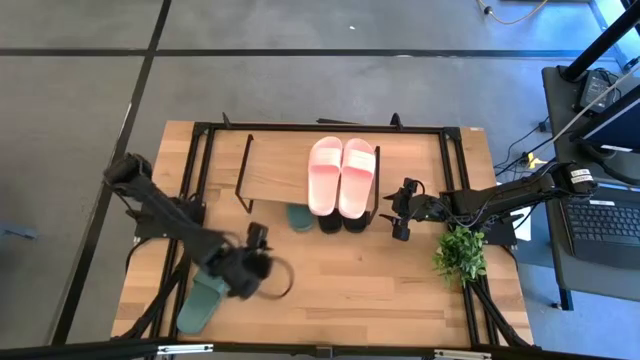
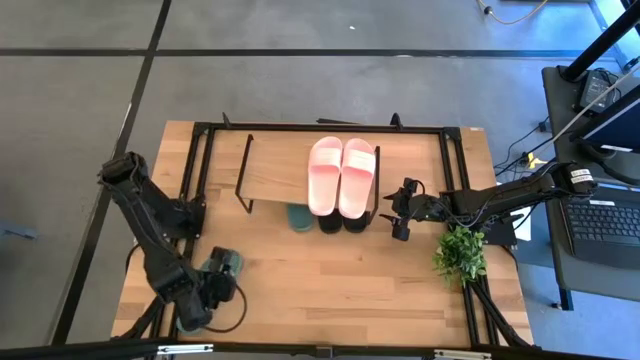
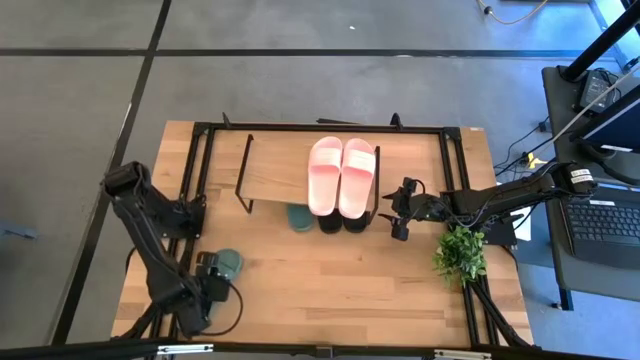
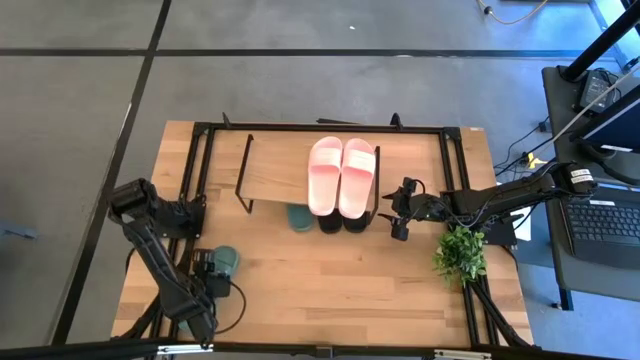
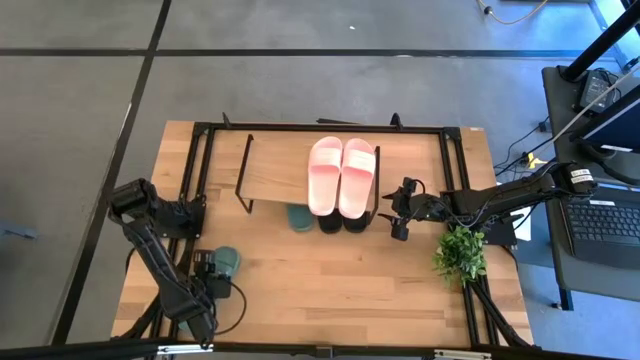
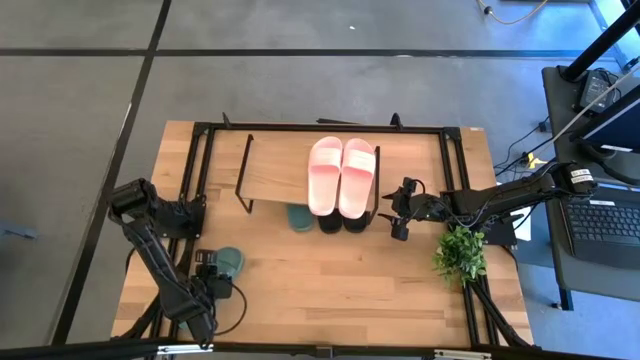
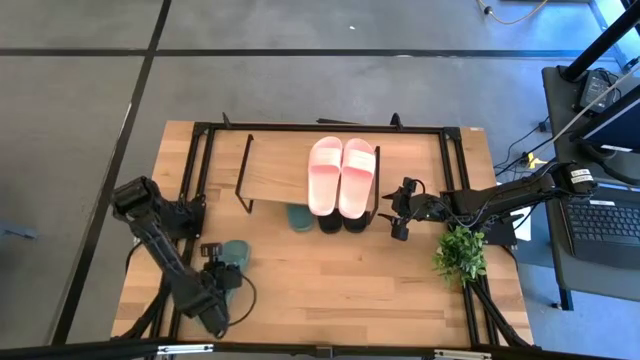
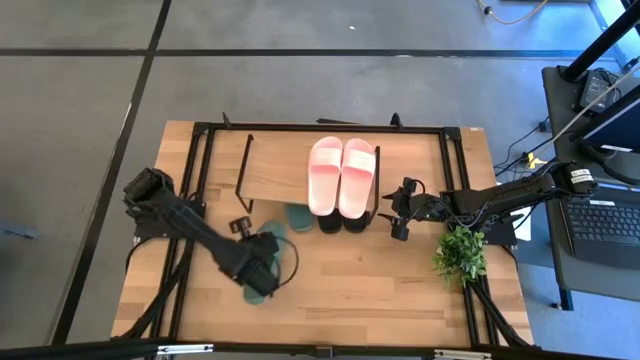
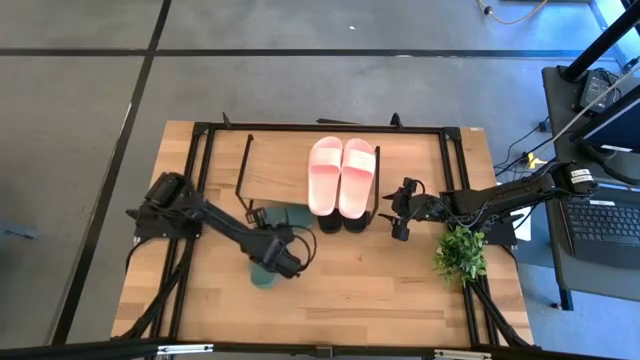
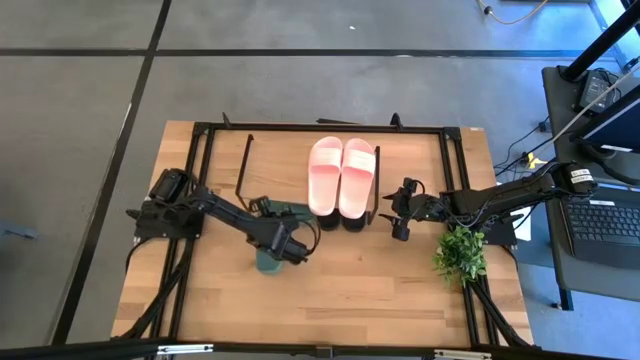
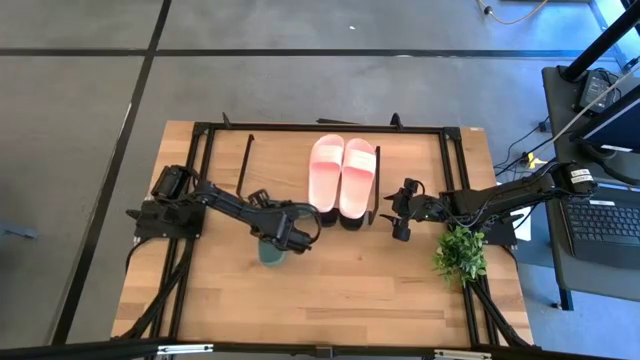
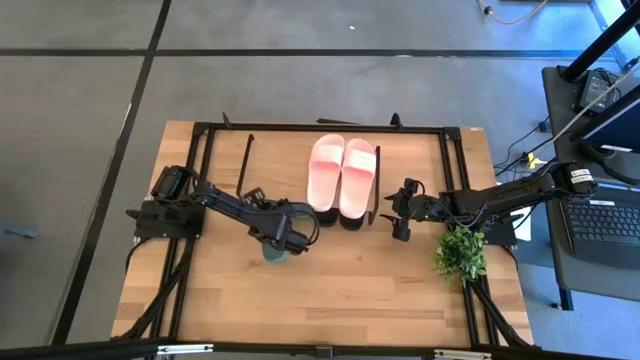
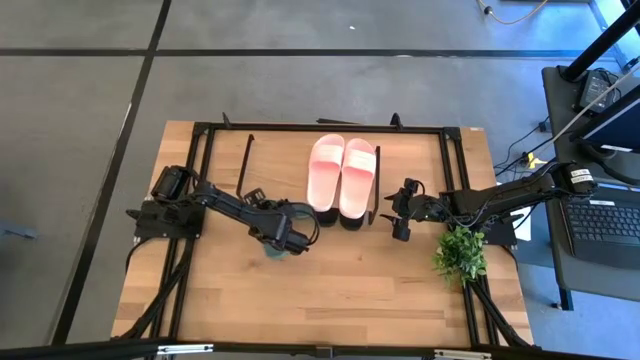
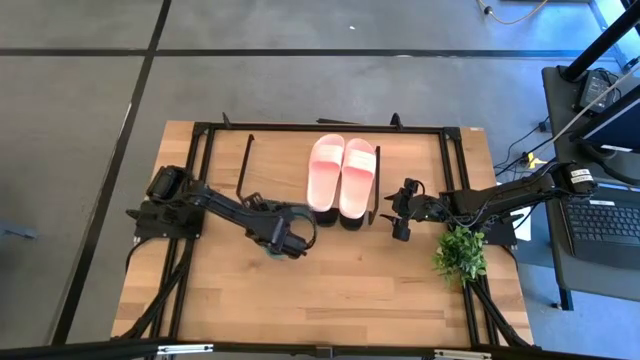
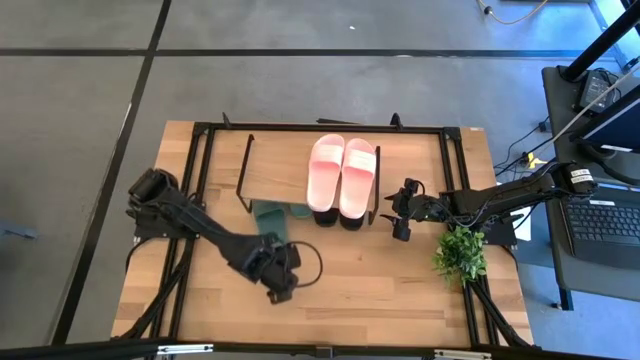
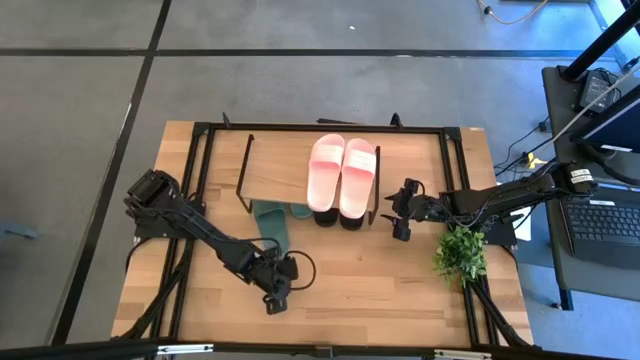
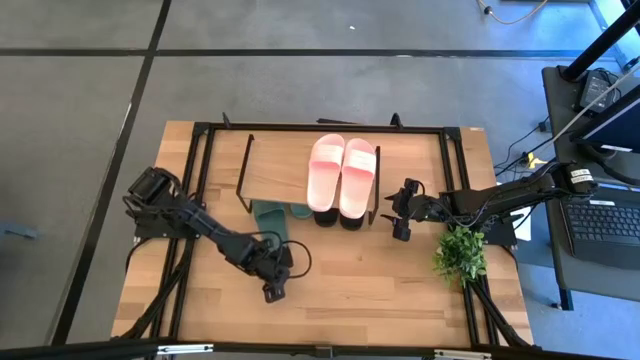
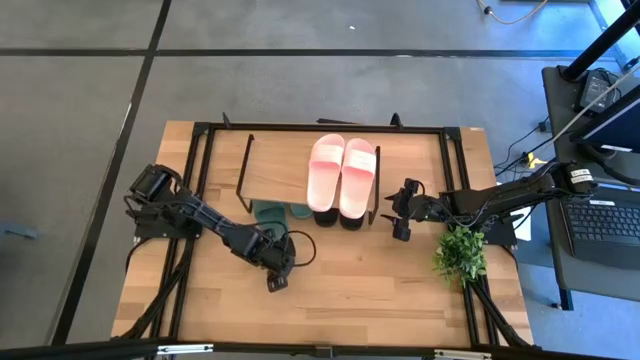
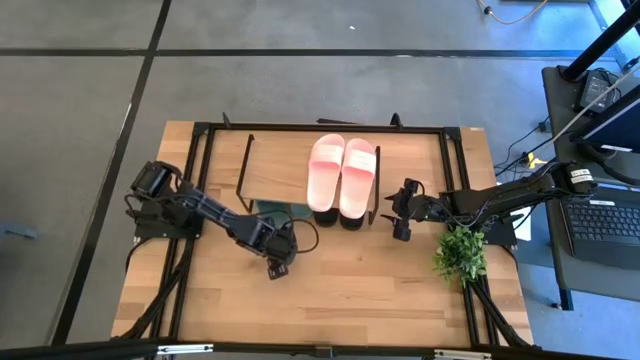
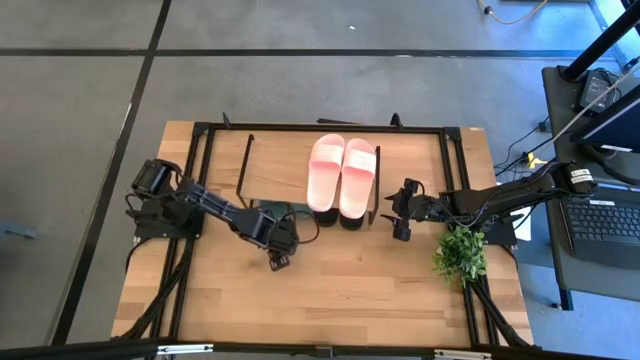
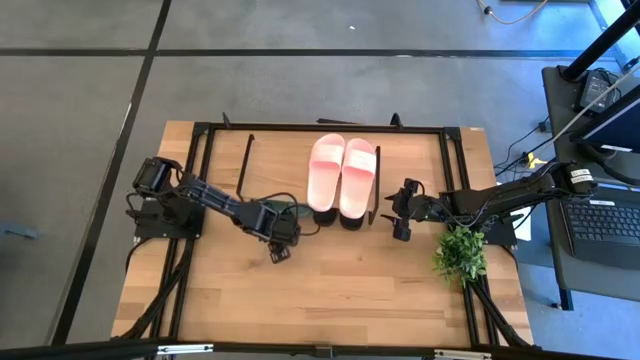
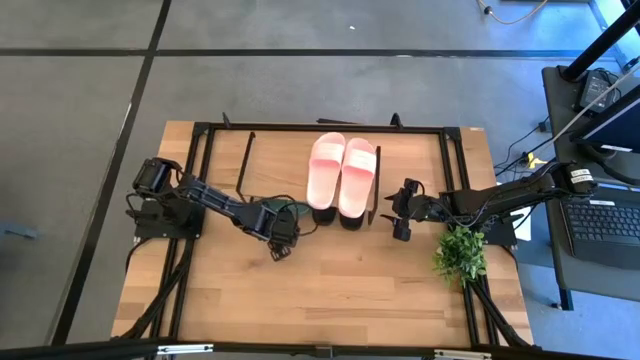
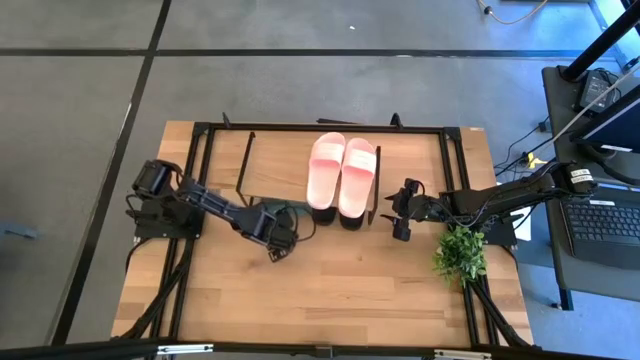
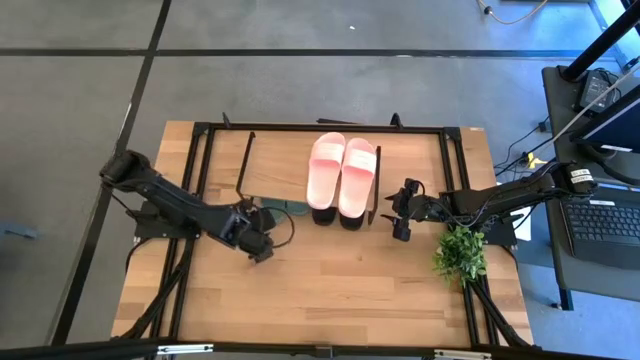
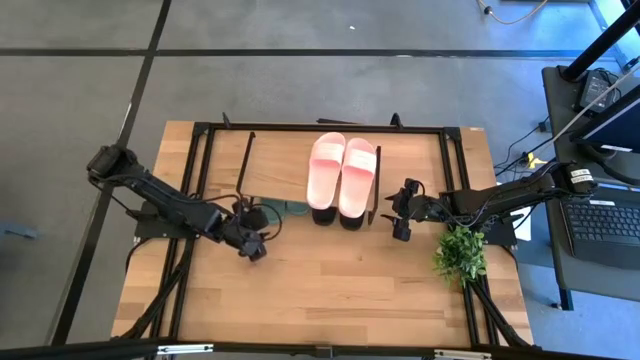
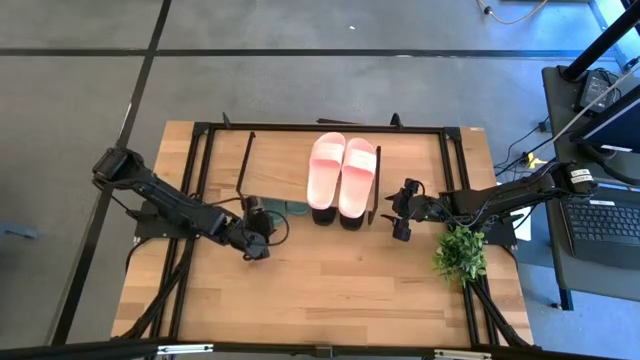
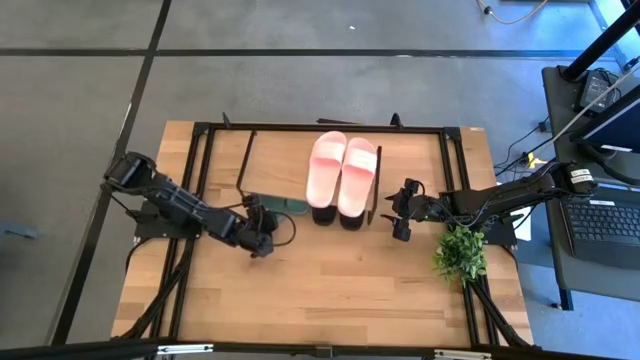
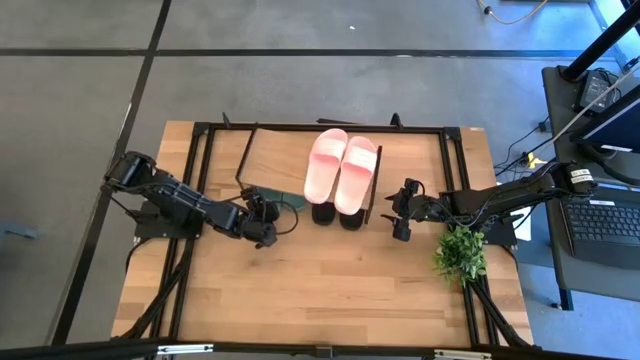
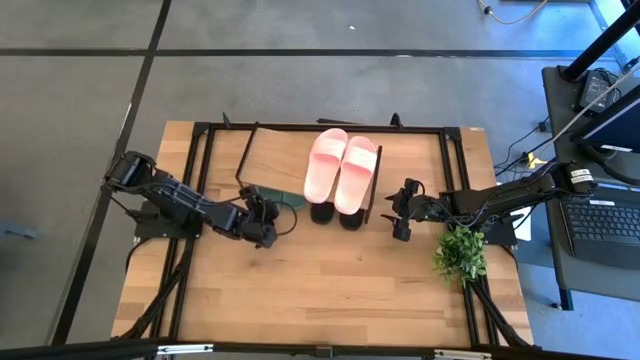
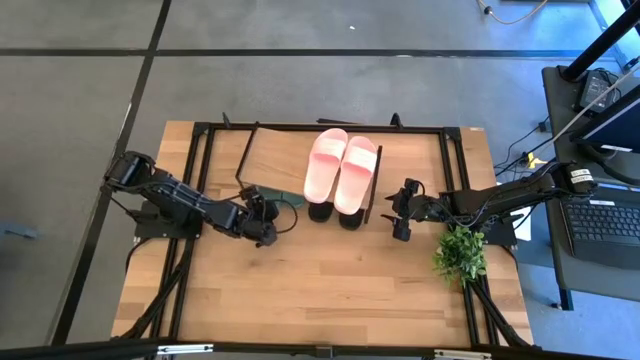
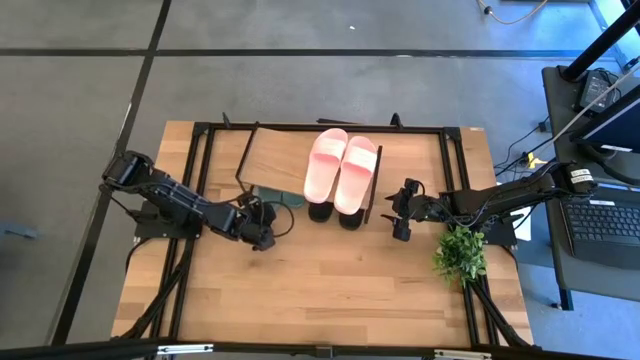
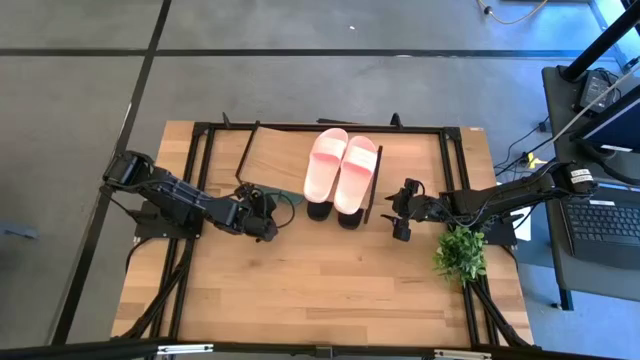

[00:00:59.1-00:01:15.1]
Task: Pick and place slides into the shelf
Put the green slide under the shelf

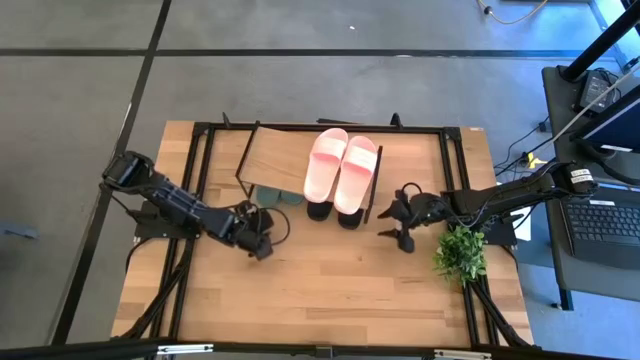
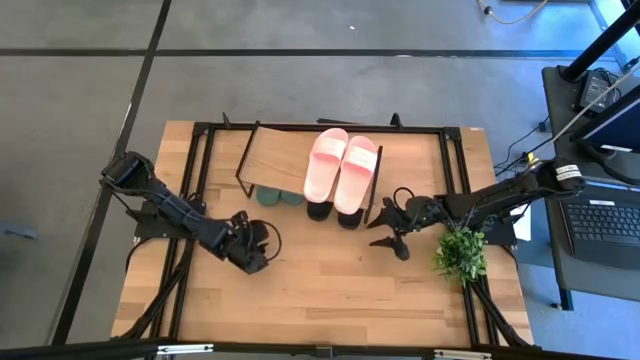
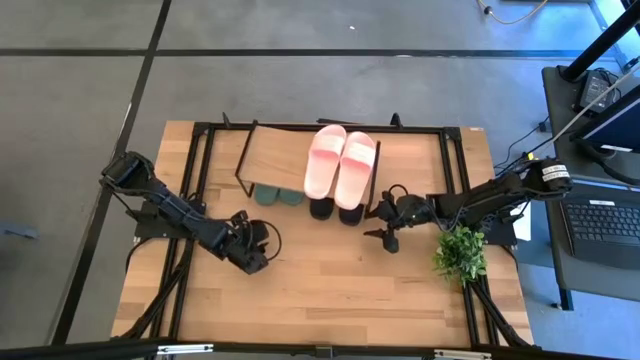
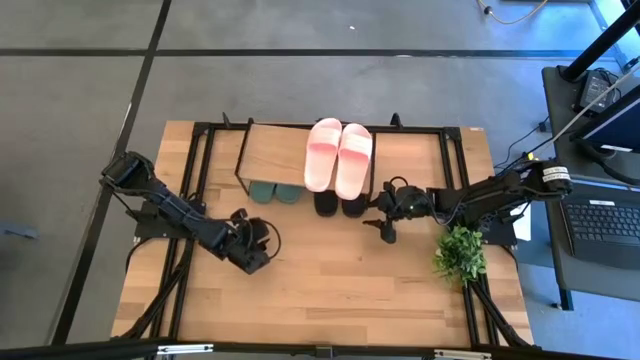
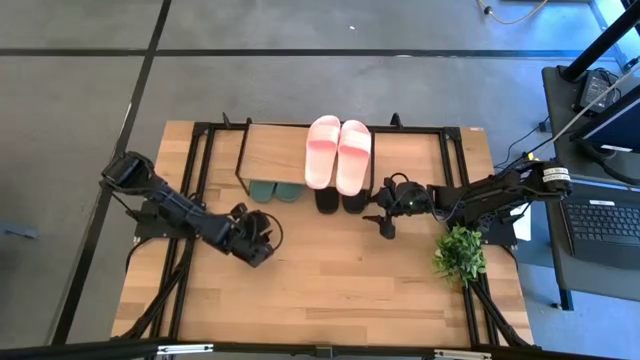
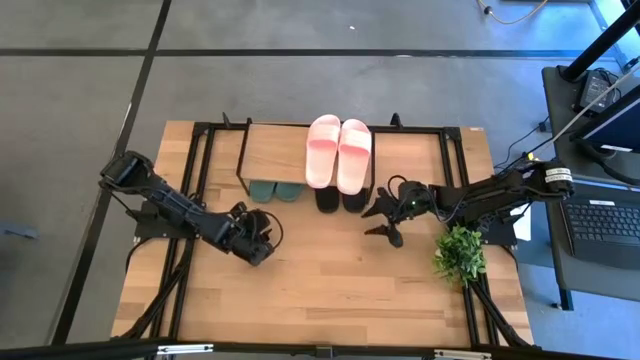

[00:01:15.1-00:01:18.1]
Adjust the shelf on the table
